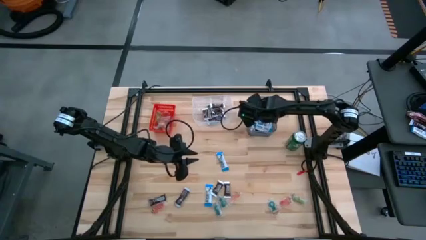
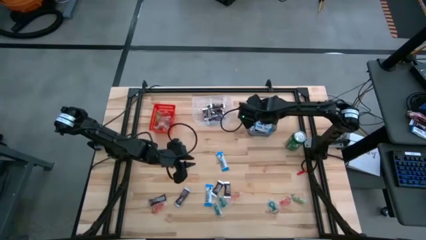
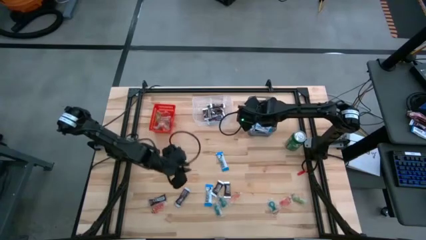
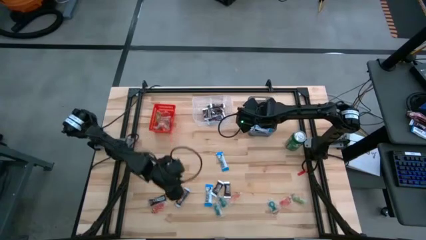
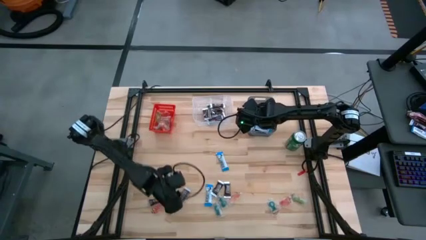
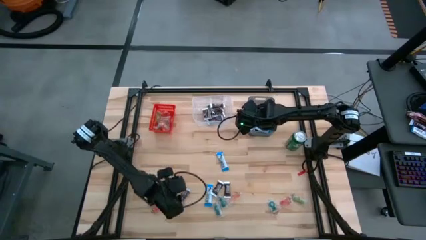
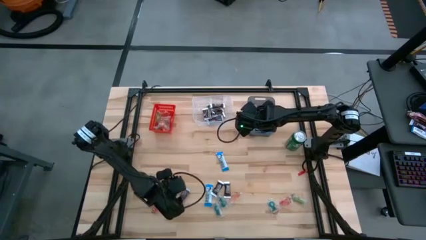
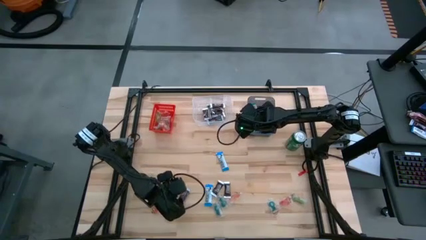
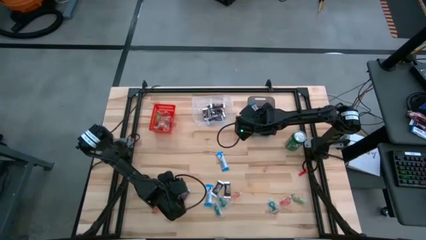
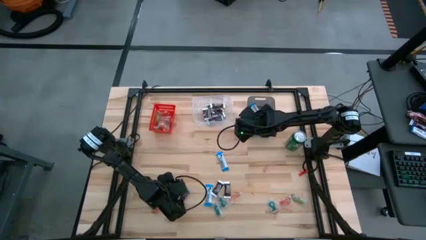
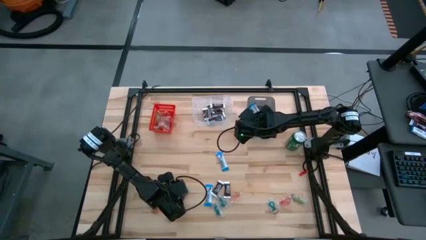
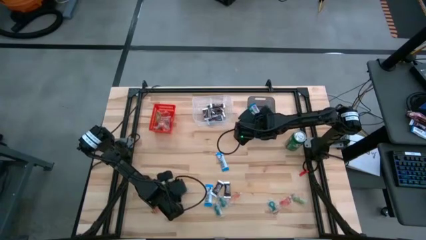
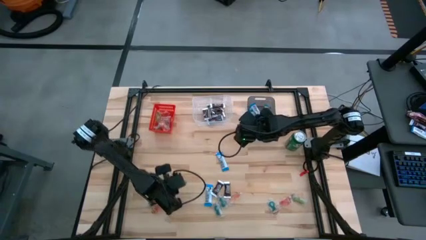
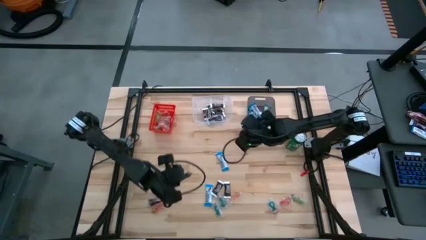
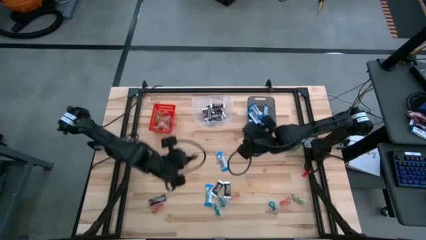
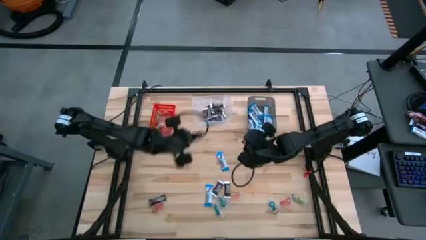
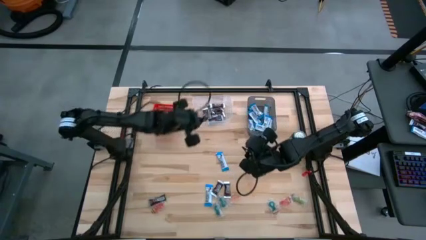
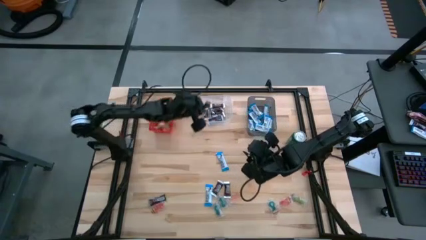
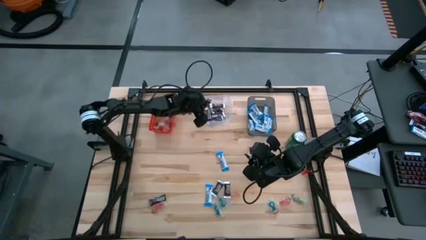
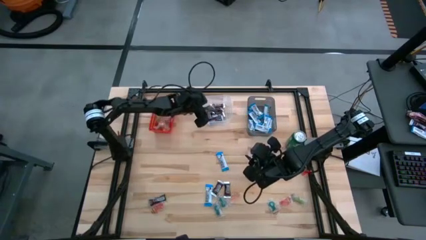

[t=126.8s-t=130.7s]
Task: Sort candy
Put the black chocolate bar into the transparent bin

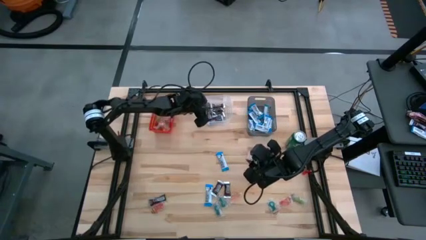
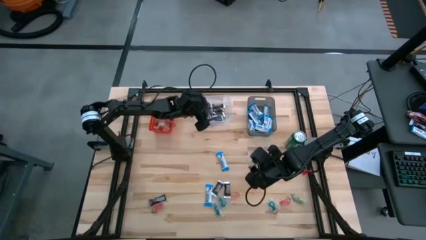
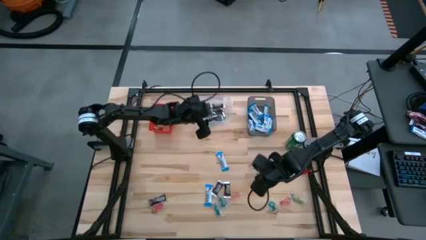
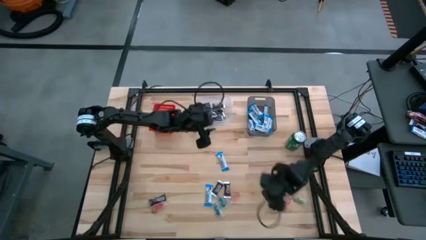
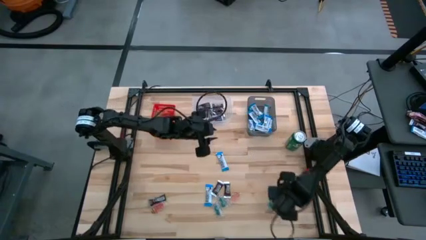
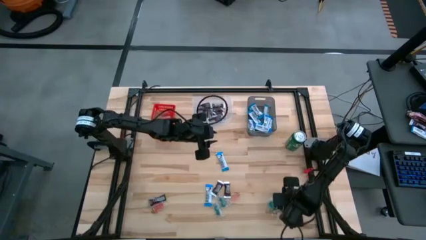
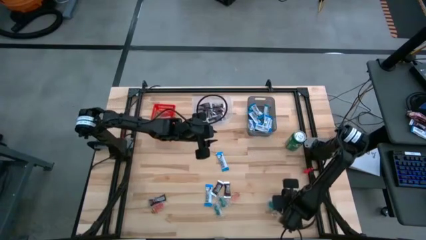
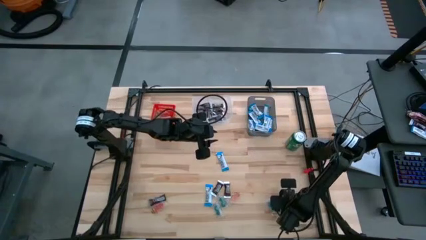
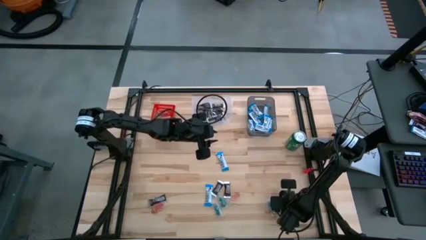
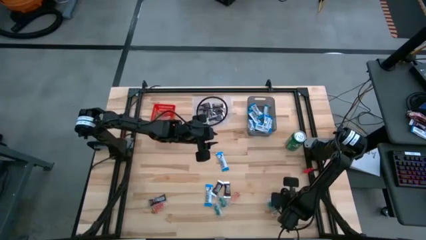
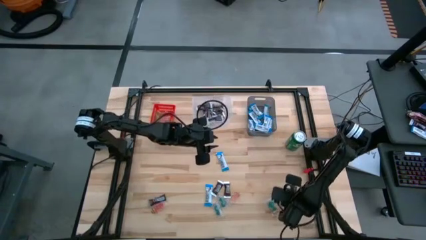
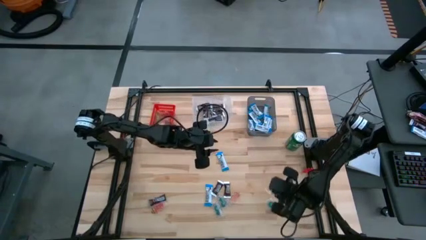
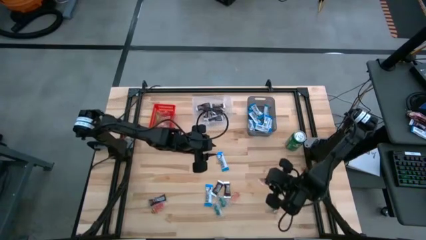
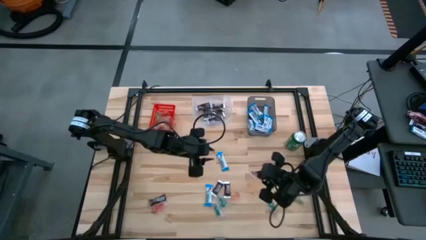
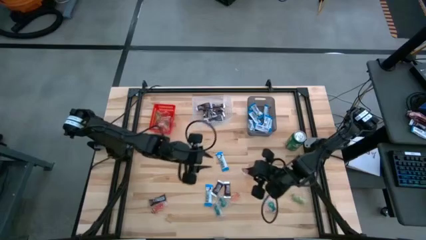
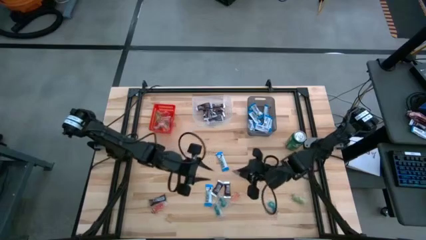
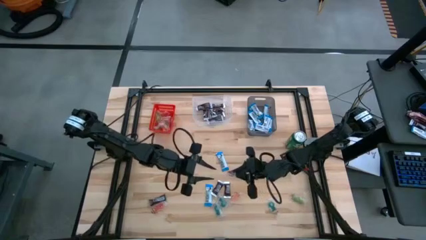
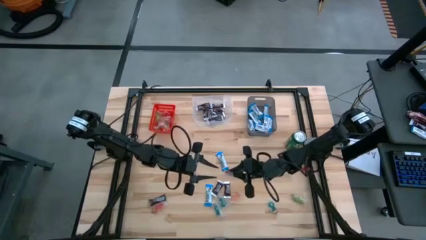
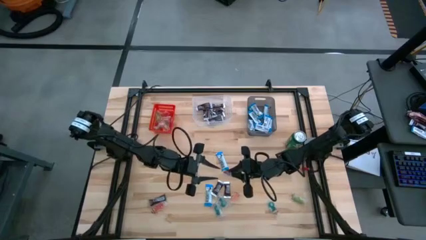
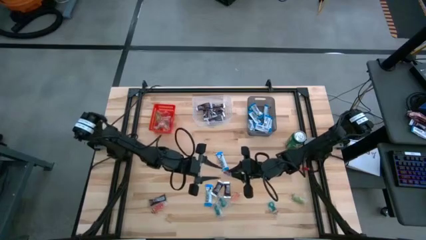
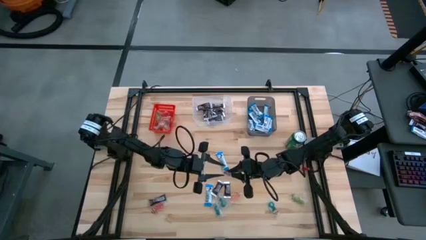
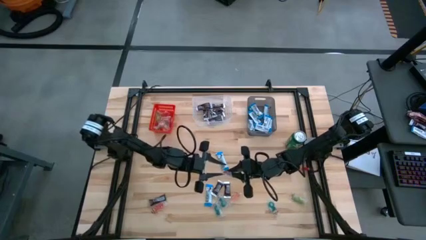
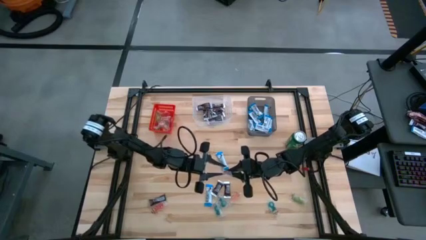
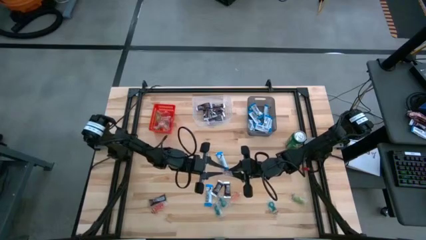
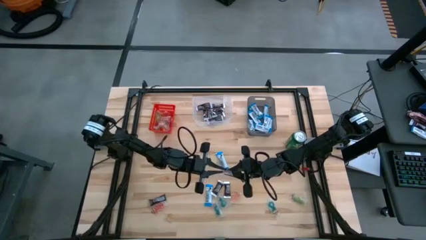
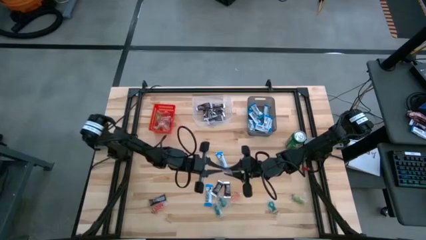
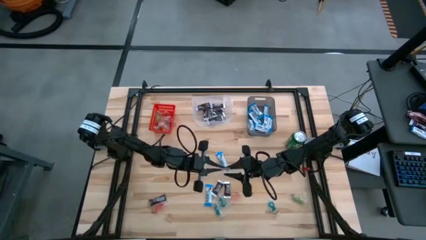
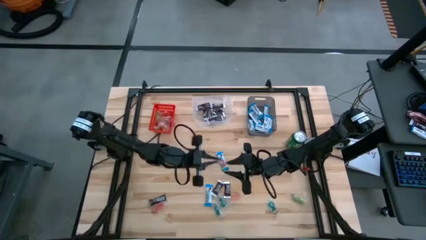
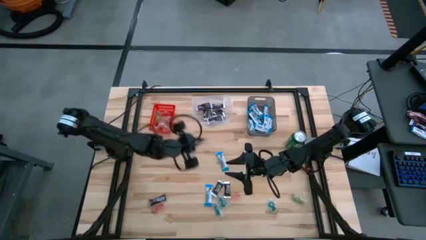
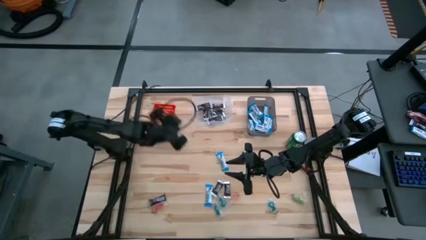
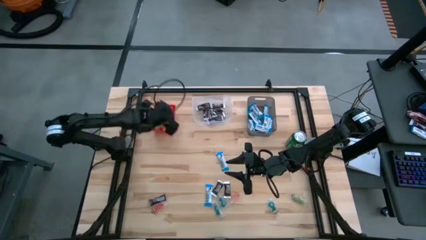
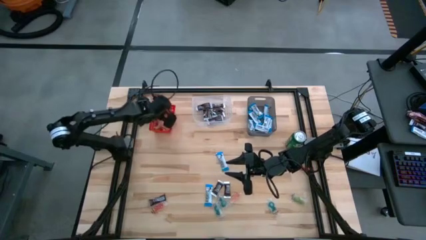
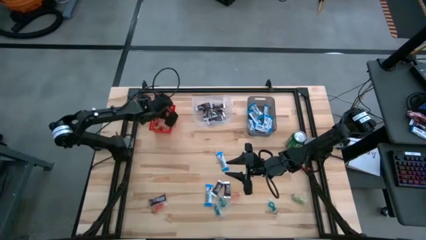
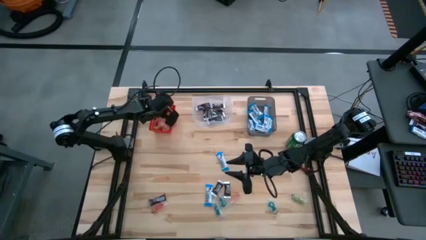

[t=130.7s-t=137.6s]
Put the red candy into the red bin

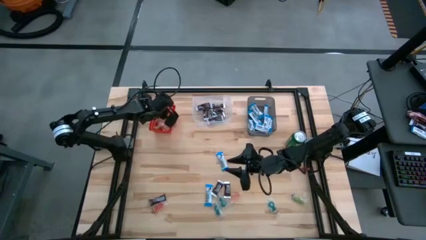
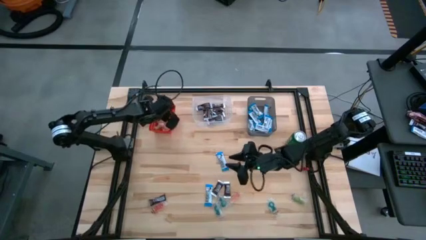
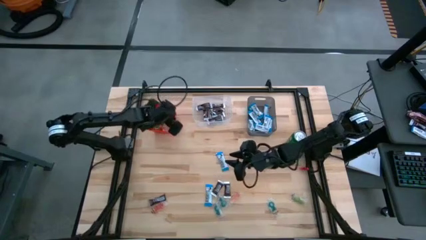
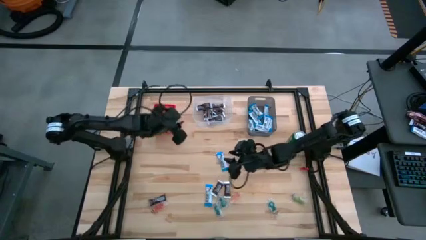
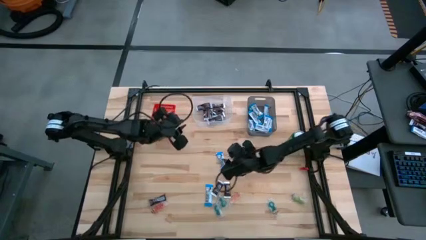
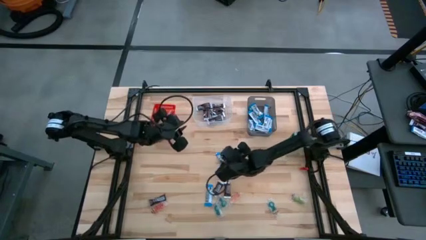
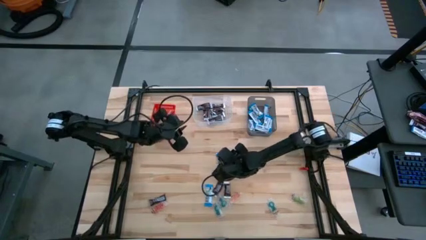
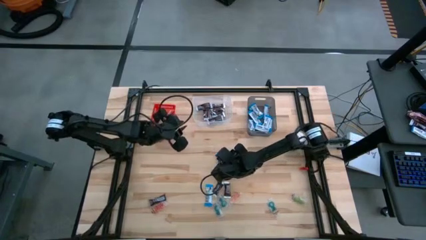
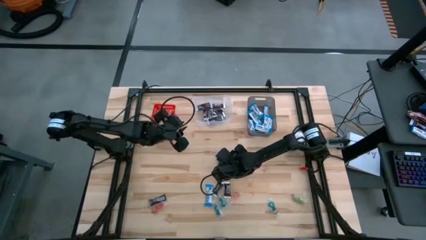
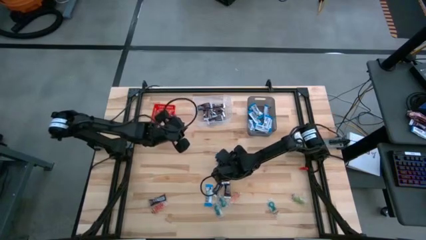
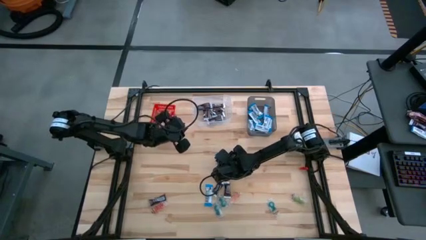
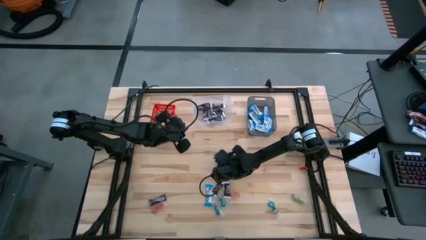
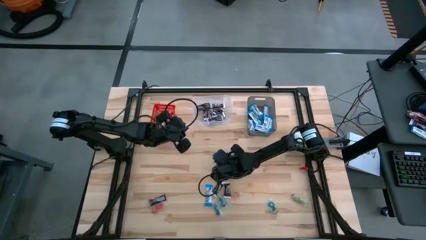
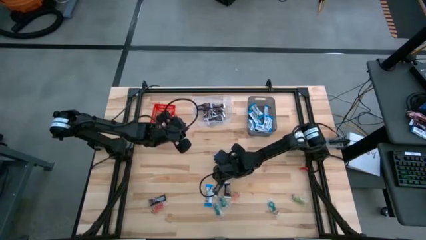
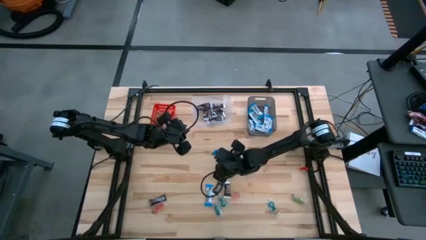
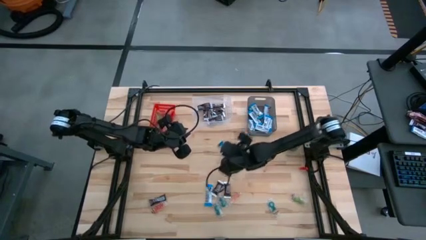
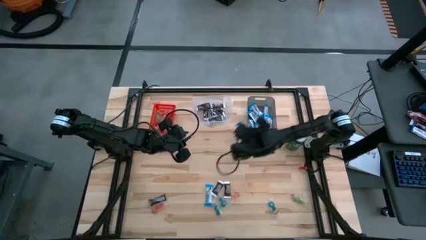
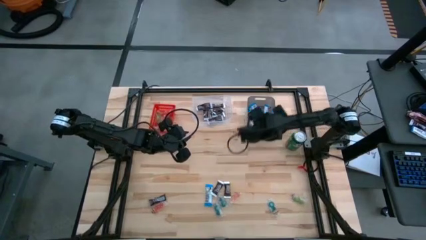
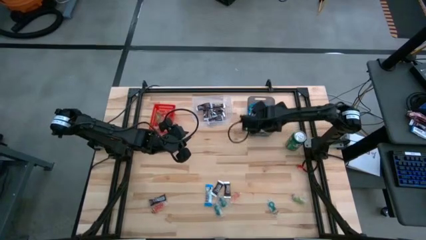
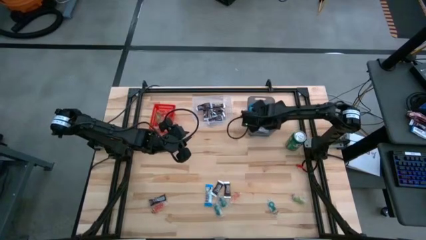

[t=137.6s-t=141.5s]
Put the white chocolate bar into the black bin

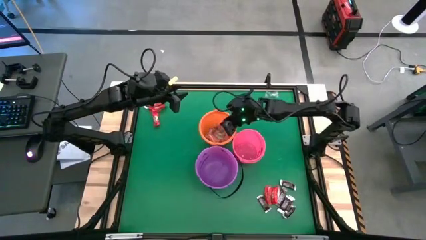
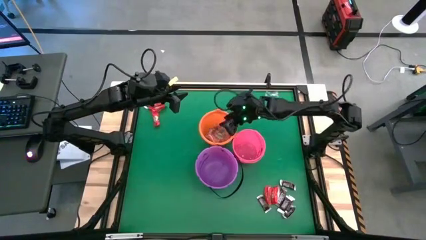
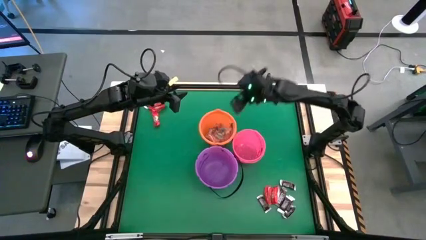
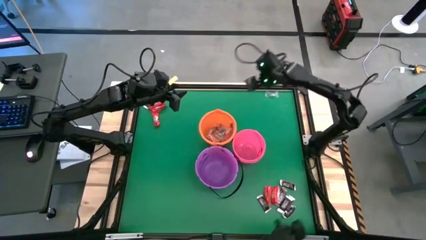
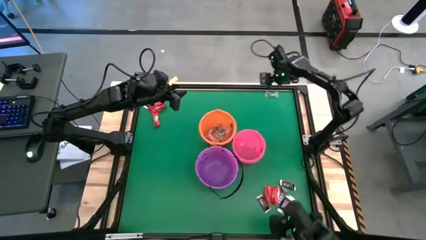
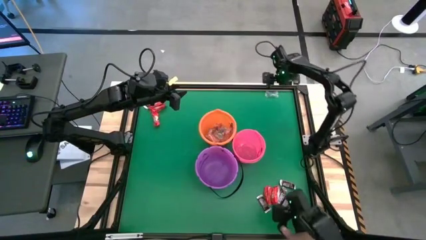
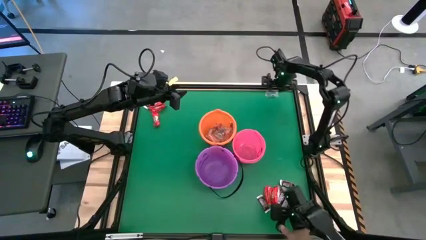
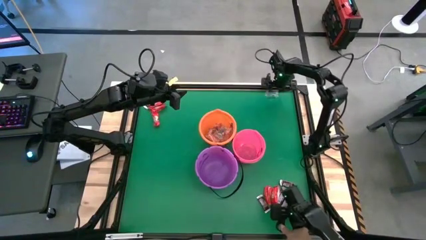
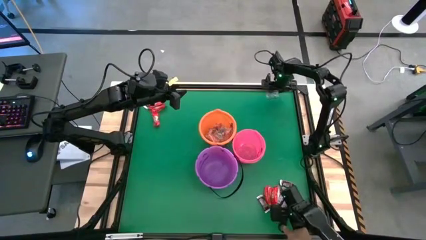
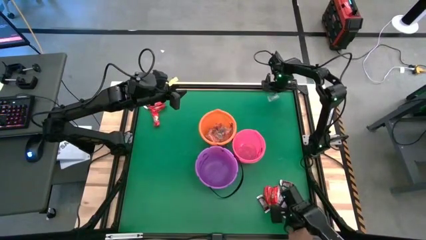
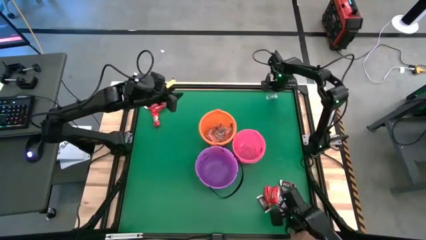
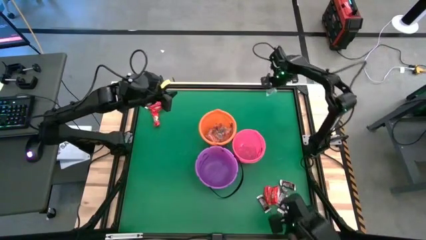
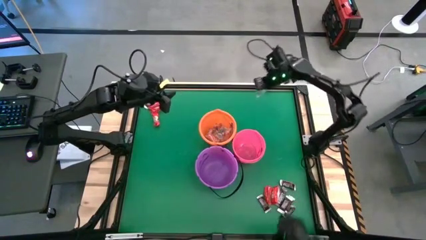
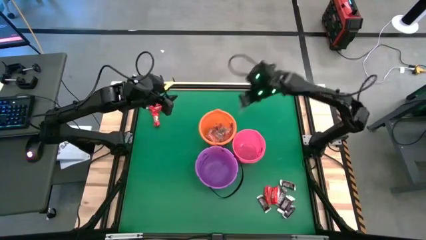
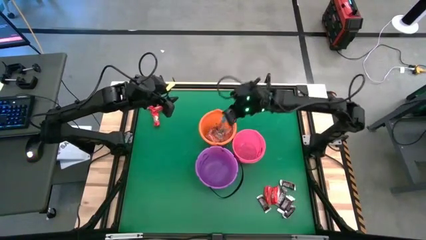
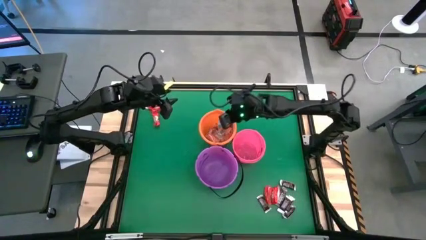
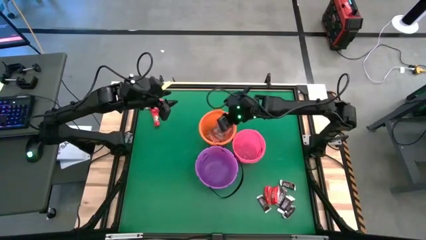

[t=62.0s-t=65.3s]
Task: Sort candy by brand, put in halloween buckets
Put the blue gummy into the orange bucket
